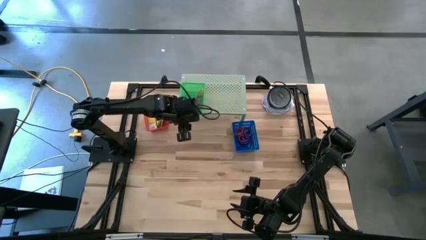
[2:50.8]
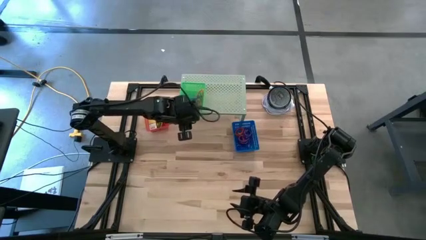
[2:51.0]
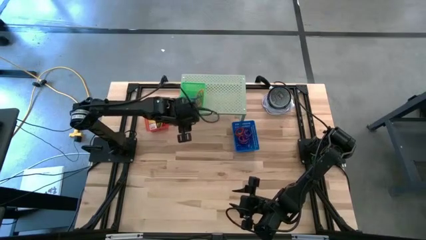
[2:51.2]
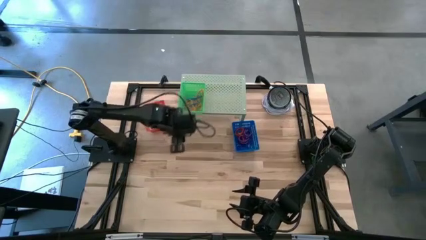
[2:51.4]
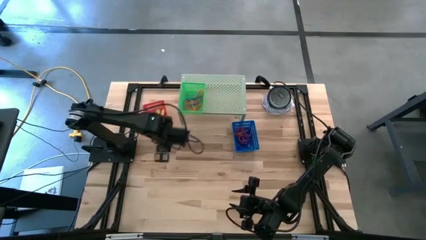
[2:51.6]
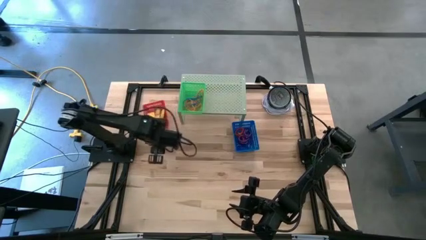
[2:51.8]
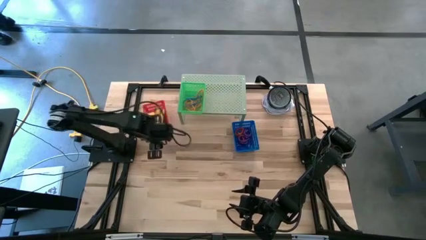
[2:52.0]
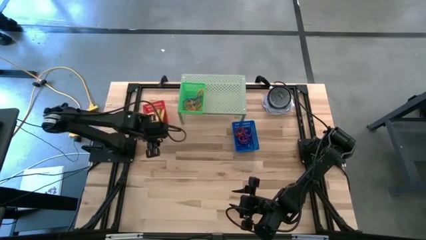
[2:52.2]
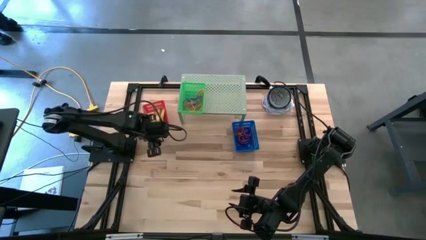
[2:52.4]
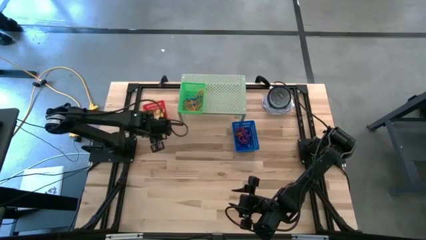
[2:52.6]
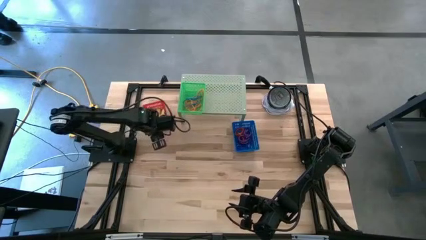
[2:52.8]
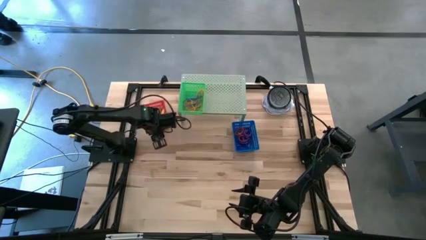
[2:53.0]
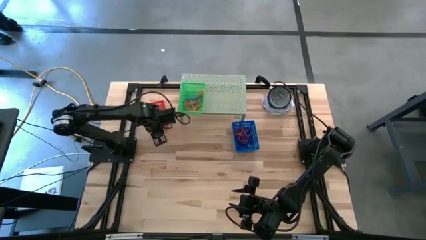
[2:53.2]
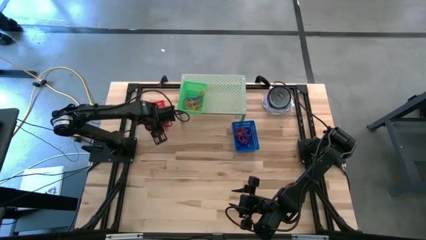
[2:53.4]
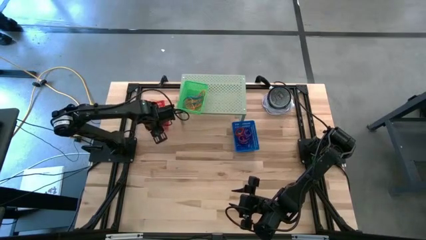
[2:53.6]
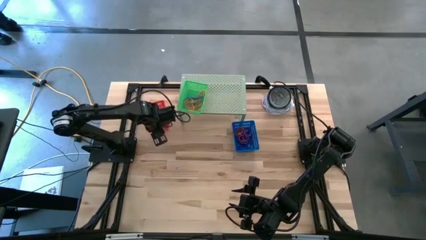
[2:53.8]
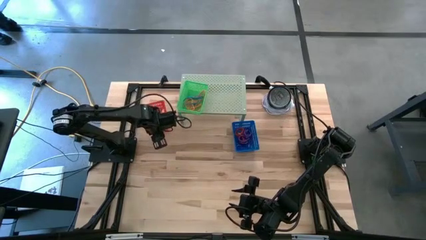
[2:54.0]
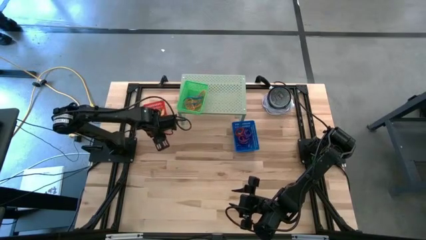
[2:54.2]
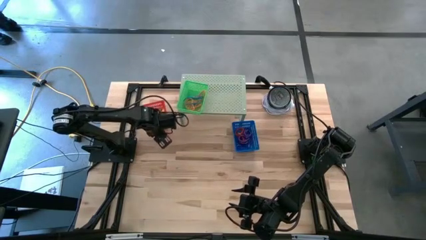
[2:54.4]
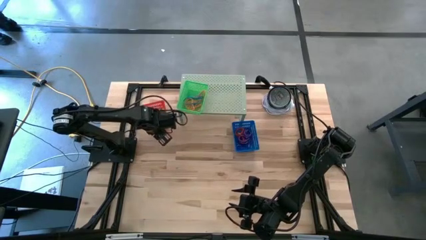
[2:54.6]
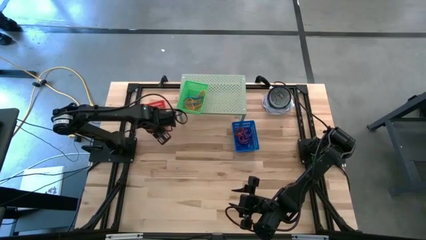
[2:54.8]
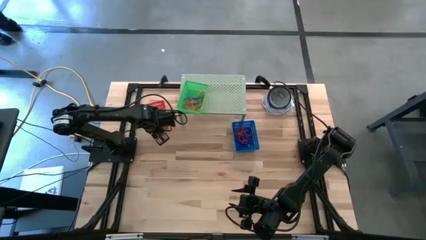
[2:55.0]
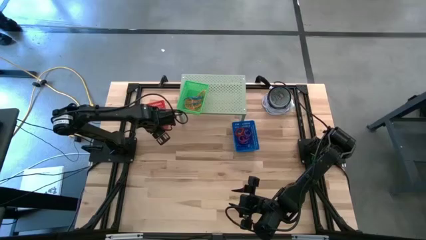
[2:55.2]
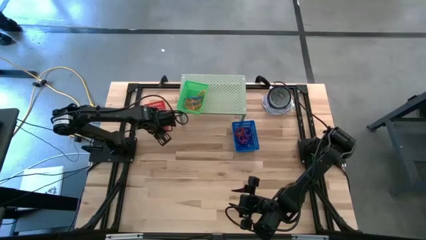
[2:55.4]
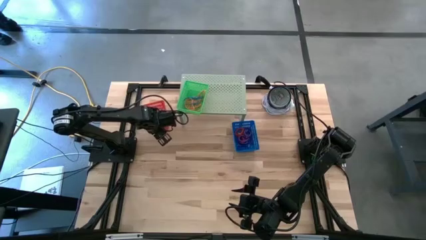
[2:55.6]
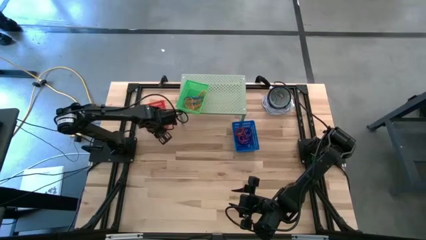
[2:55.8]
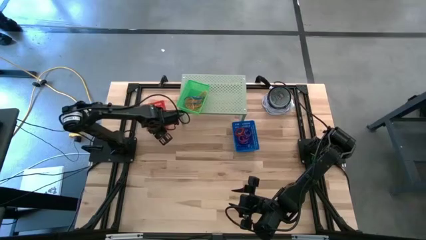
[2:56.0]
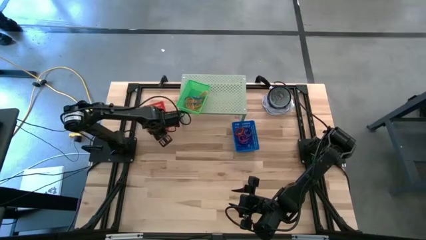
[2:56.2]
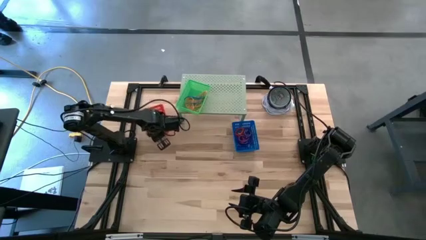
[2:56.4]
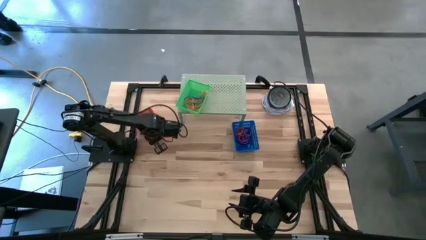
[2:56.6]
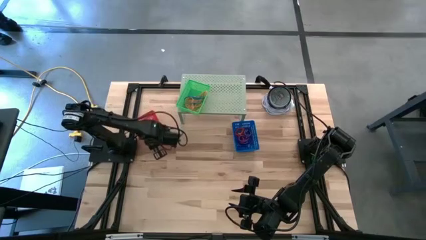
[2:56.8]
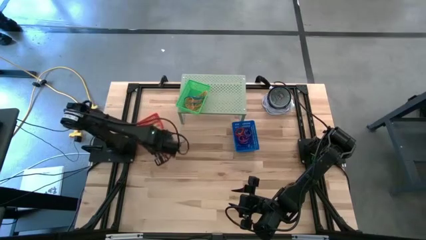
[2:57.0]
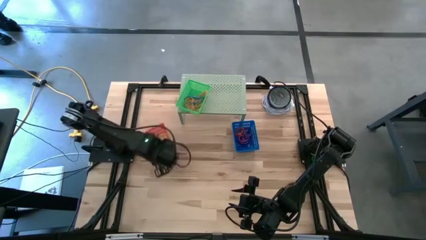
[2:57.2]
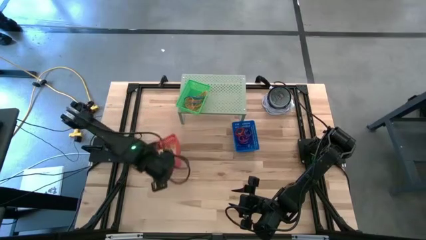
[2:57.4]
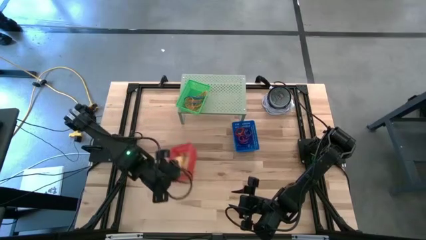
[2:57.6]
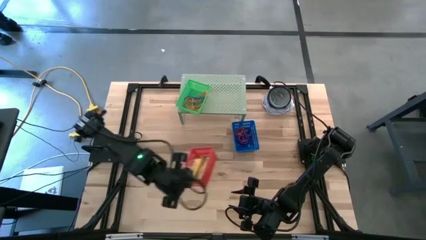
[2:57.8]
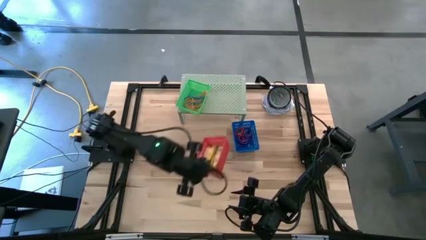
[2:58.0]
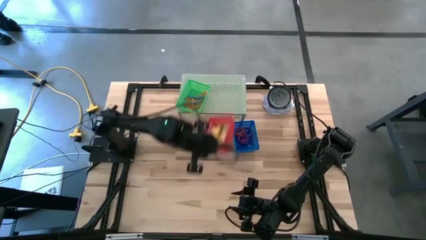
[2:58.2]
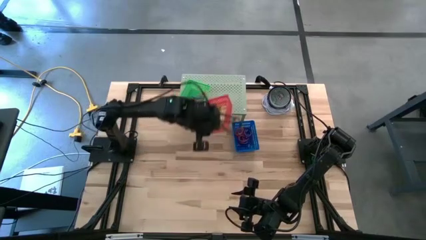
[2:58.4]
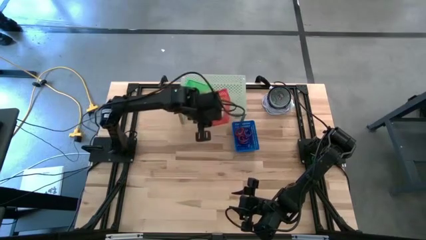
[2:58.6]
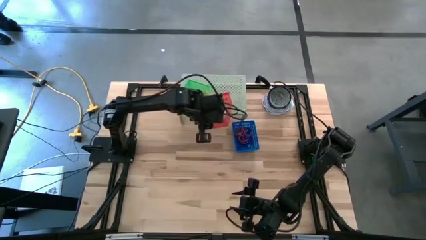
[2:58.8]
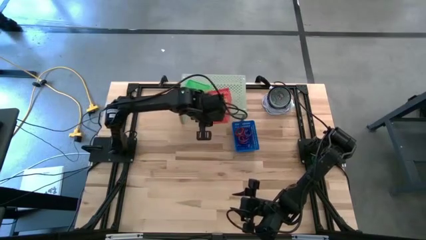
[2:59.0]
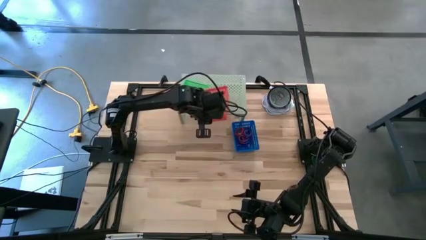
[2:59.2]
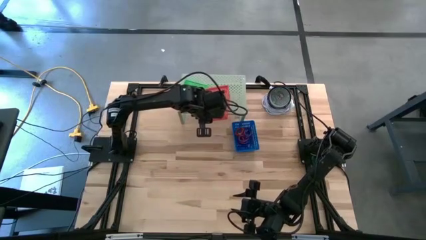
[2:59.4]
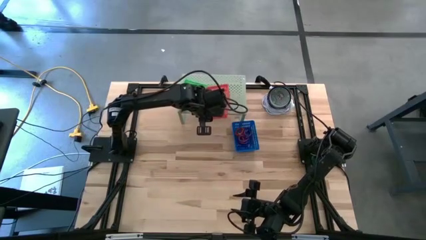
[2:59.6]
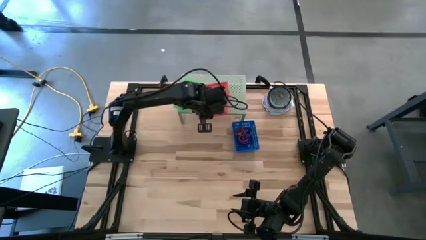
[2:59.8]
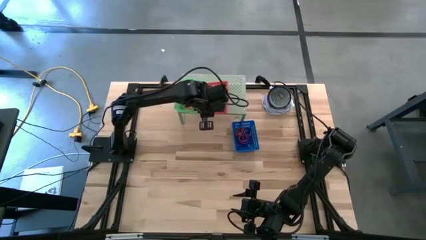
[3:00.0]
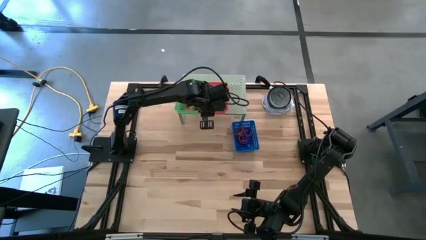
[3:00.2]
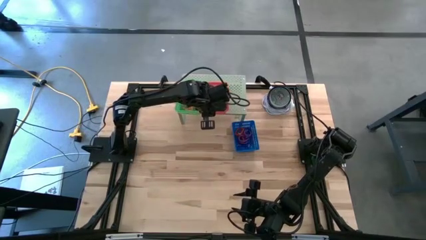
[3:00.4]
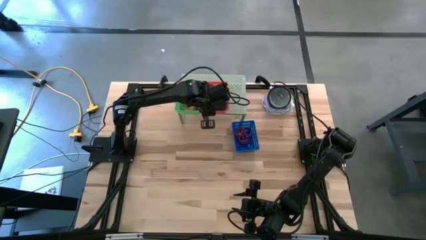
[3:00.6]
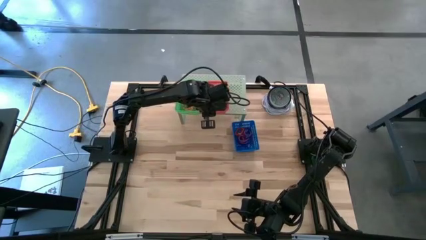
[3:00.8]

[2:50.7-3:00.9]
Task: Pick & Place Office Desk Supplies
Put the red bin on the shelf

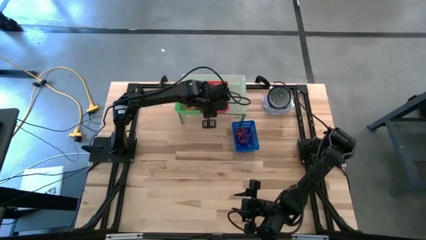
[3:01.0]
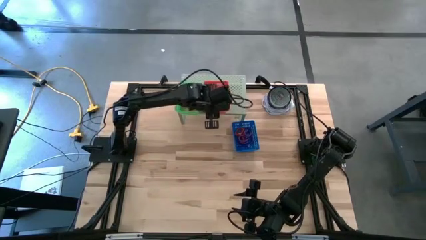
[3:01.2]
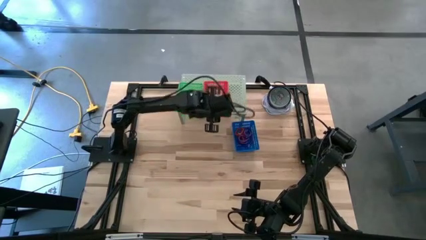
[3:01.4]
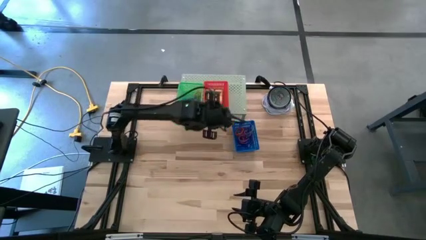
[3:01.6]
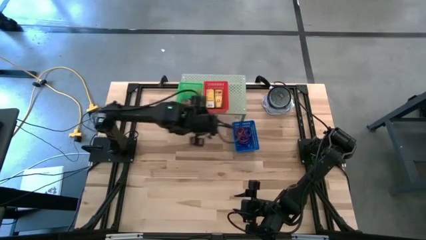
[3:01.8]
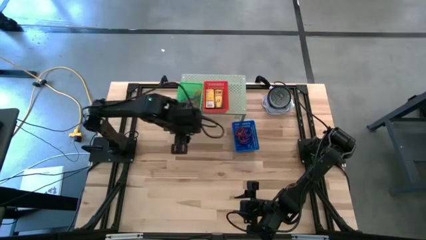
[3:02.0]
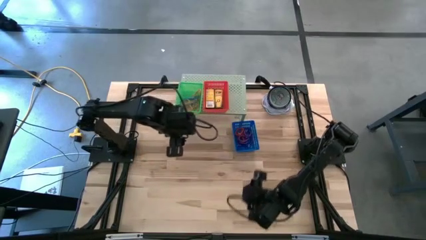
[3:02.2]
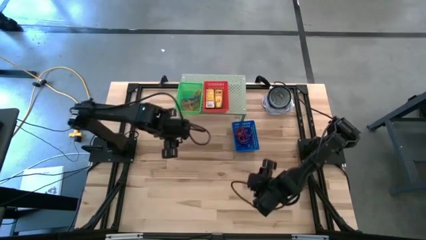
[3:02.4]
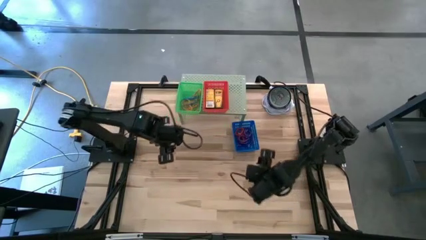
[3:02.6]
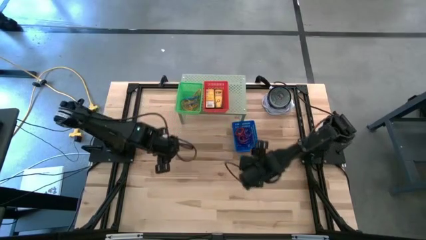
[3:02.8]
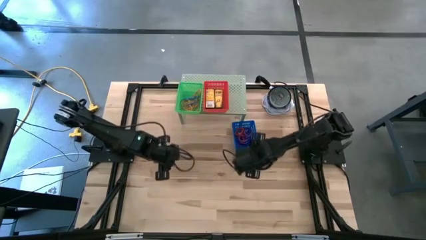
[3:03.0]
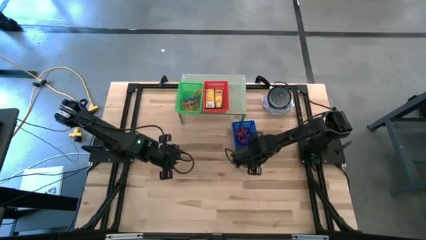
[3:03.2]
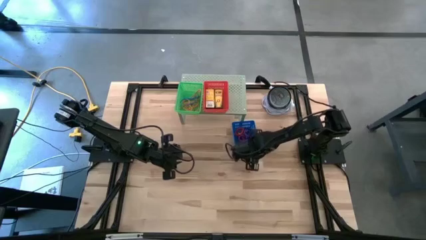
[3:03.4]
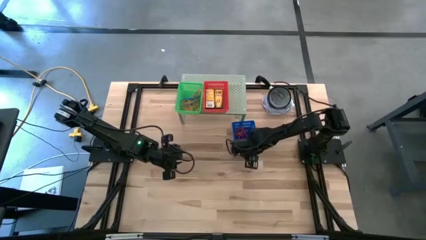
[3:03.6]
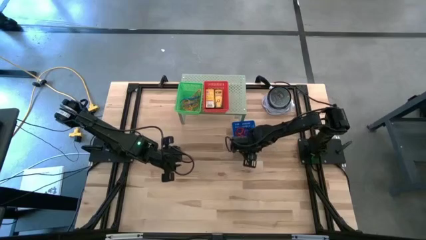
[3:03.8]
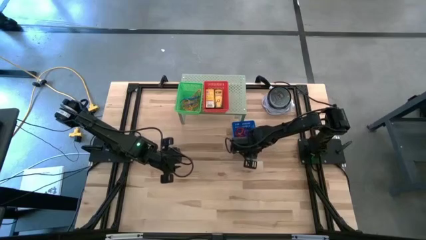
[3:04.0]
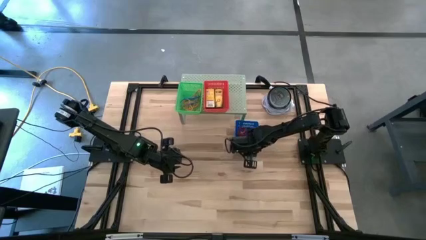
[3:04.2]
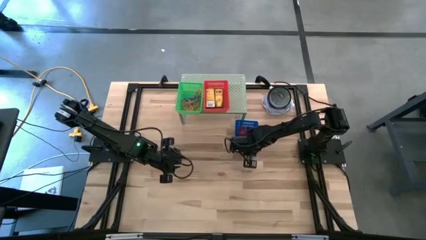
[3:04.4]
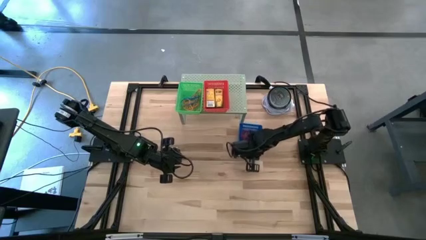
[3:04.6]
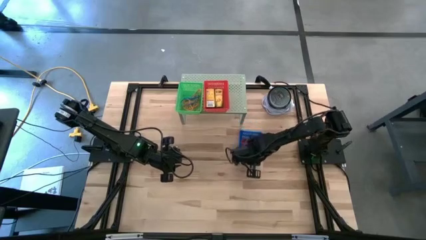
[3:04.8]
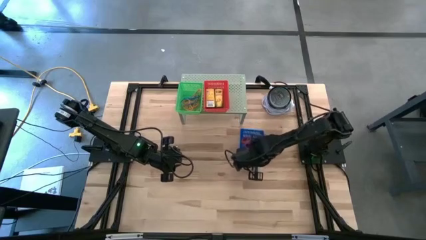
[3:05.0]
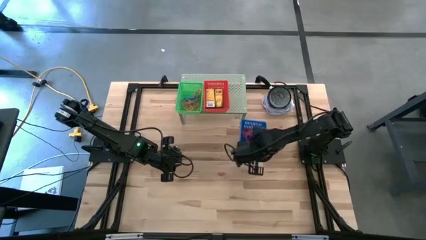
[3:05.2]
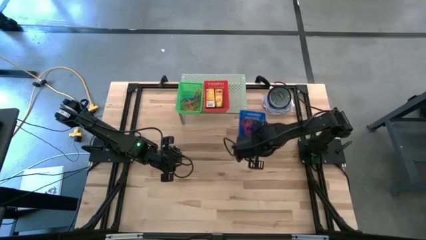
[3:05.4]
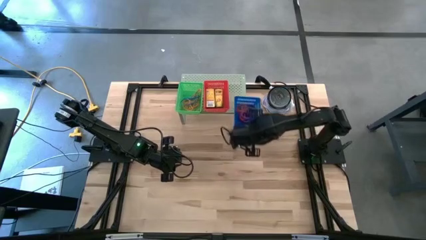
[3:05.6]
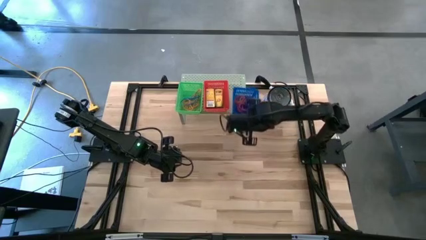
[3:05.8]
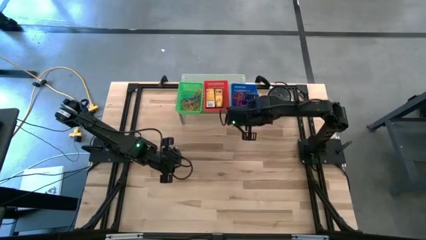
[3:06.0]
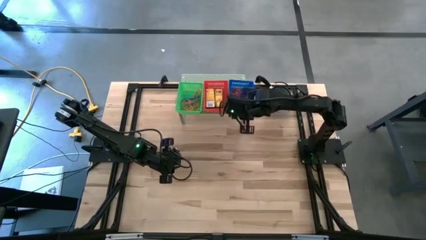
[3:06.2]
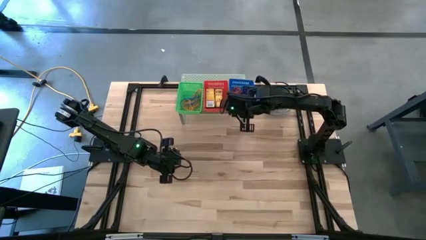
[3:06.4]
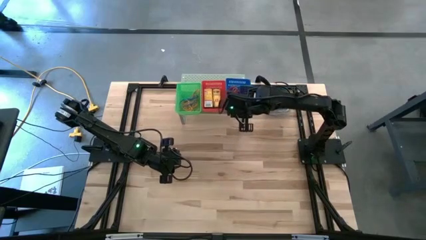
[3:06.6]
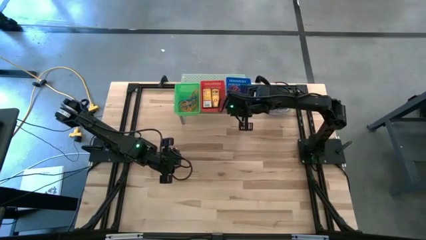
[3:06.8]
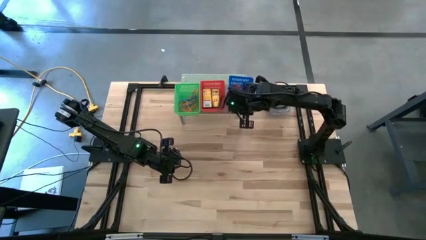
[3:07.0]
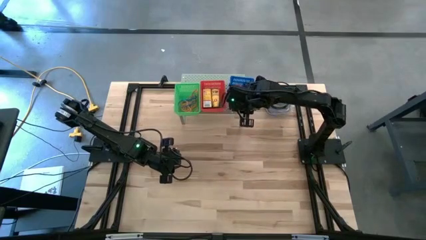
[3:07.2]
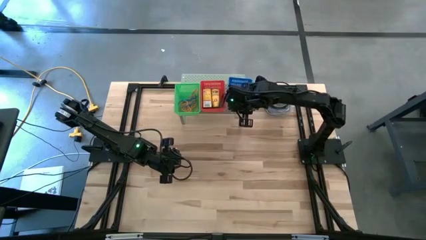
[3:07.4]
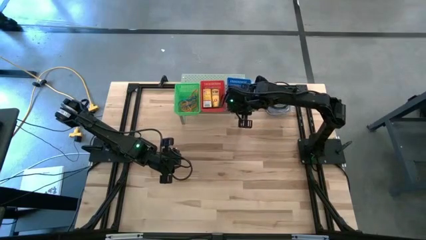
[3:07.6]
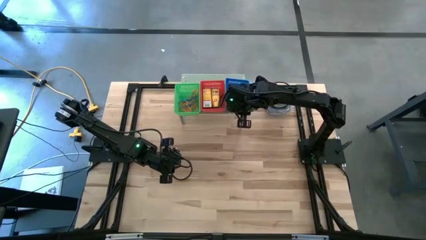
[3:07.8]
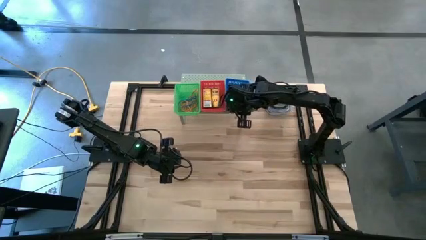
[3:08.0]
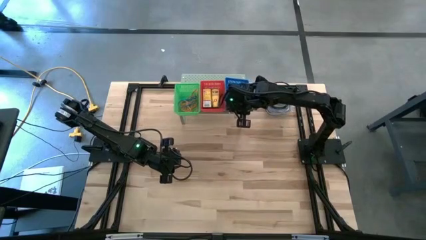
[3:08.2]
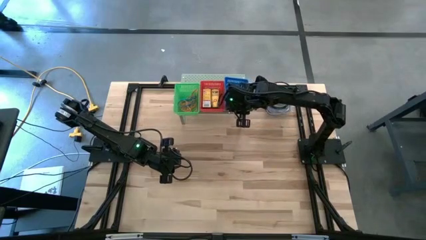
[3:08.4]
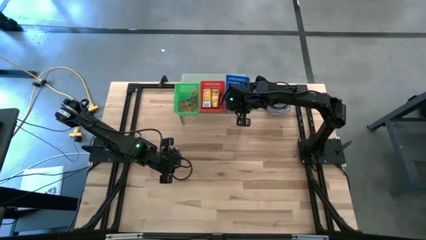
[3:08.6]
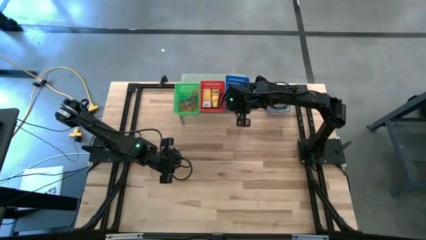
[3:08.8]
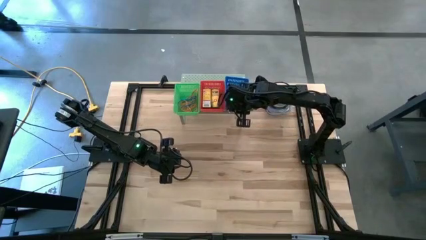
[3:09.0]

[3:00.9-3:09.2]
Put the blue bin on the shelf
